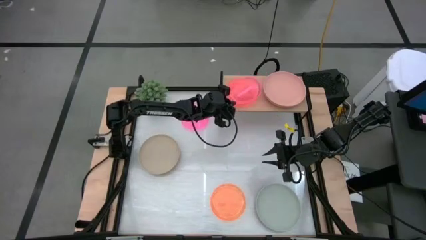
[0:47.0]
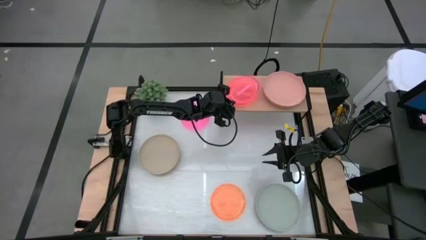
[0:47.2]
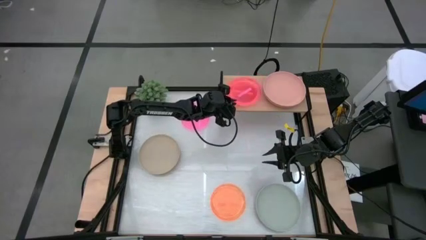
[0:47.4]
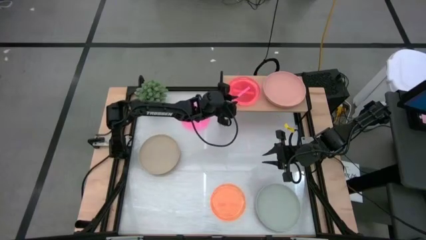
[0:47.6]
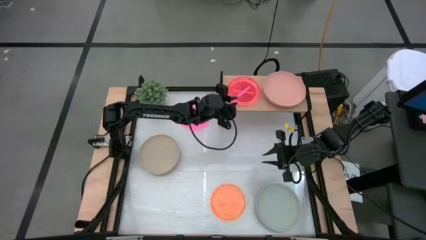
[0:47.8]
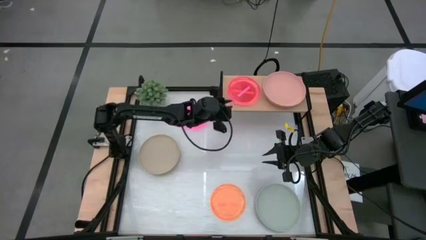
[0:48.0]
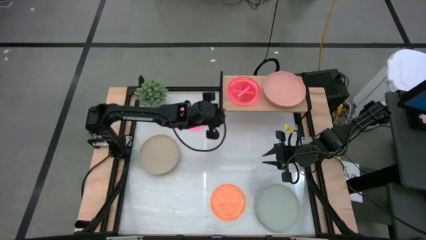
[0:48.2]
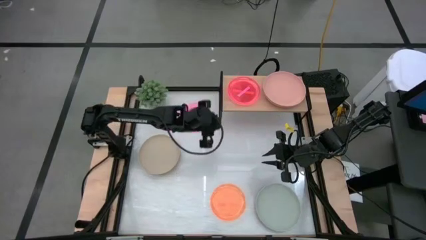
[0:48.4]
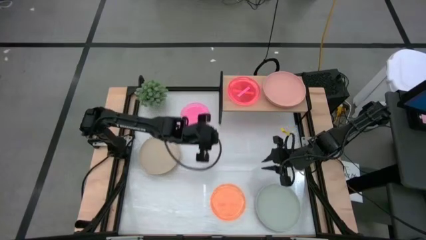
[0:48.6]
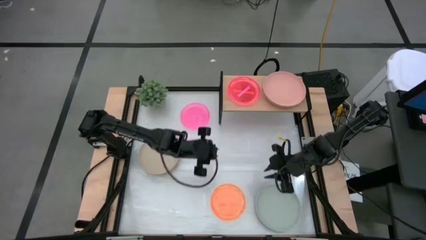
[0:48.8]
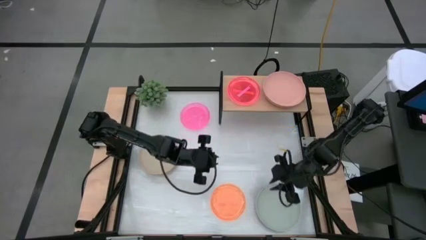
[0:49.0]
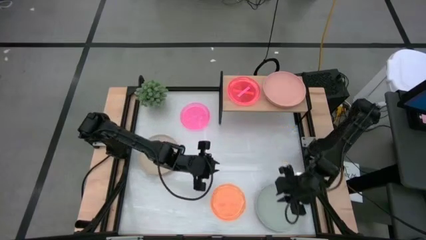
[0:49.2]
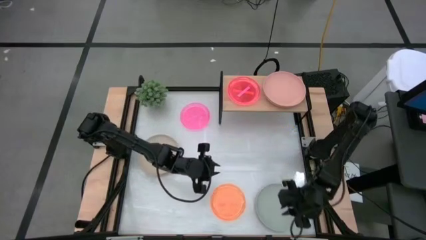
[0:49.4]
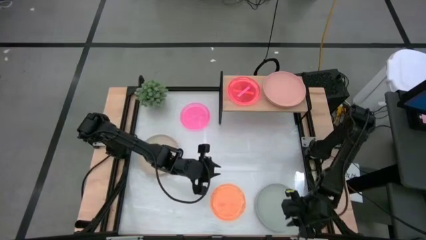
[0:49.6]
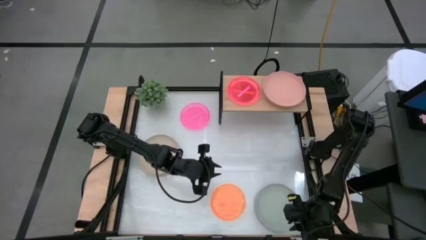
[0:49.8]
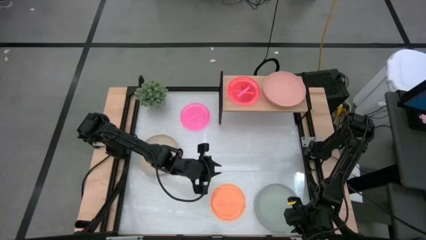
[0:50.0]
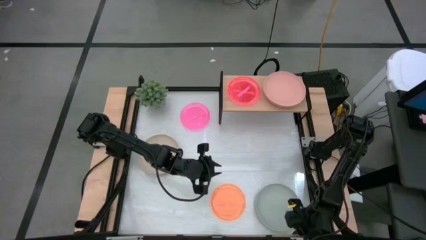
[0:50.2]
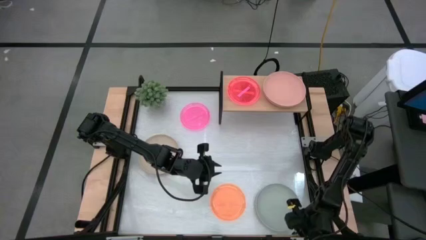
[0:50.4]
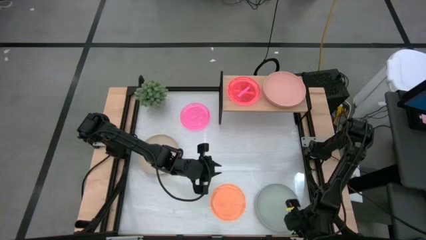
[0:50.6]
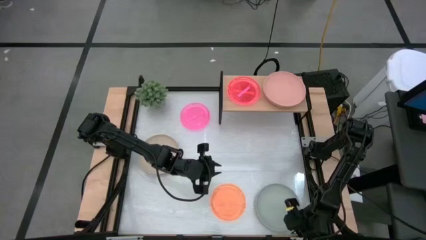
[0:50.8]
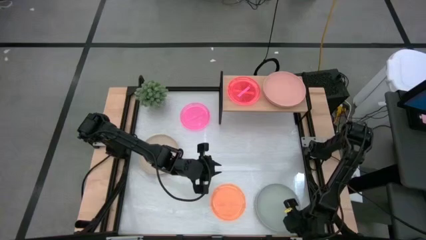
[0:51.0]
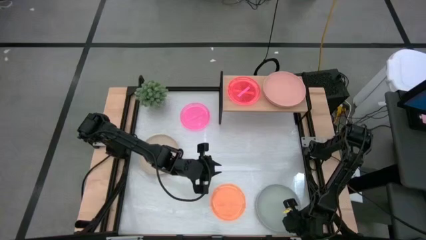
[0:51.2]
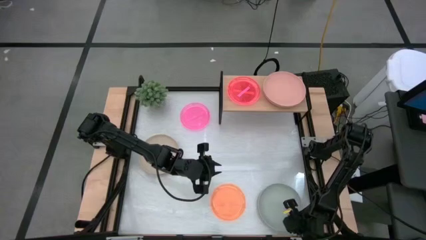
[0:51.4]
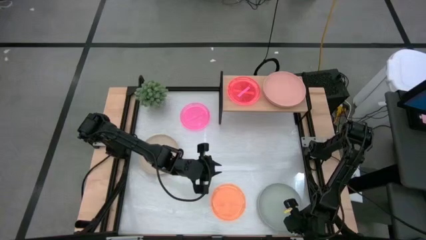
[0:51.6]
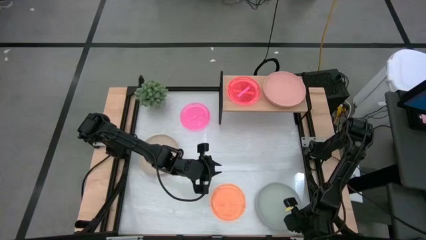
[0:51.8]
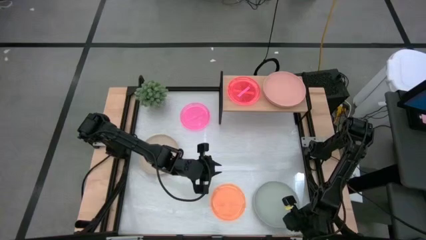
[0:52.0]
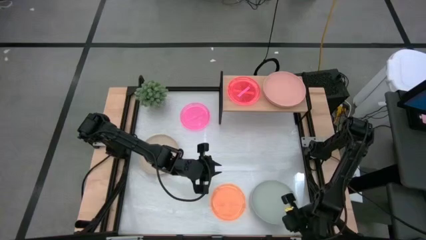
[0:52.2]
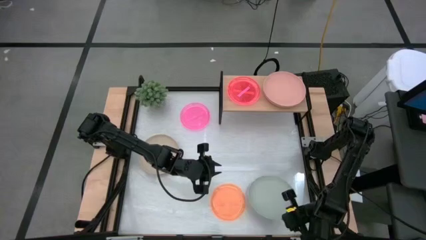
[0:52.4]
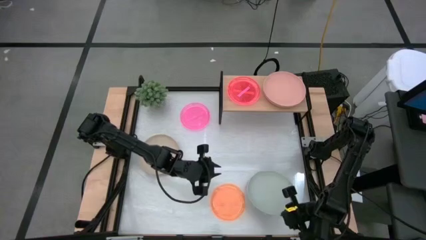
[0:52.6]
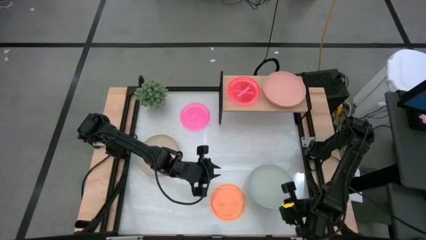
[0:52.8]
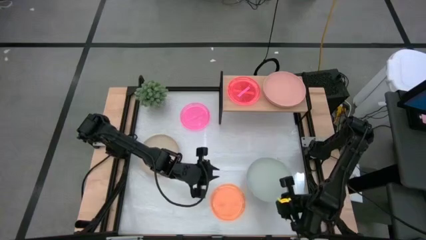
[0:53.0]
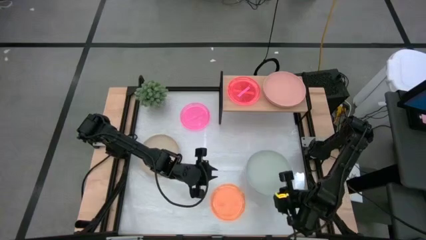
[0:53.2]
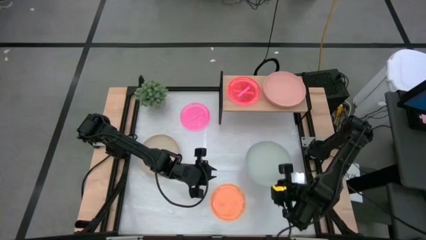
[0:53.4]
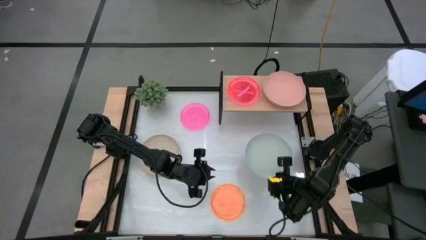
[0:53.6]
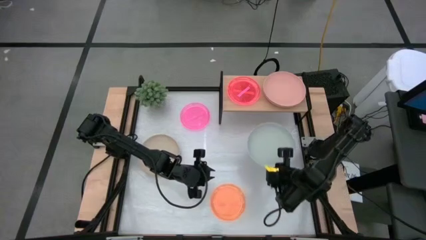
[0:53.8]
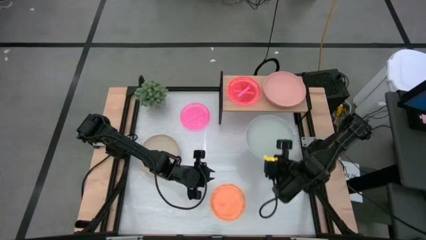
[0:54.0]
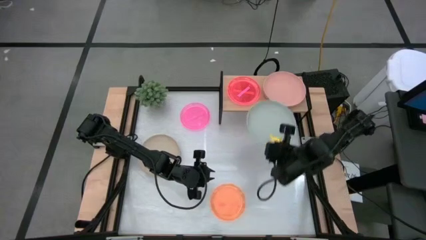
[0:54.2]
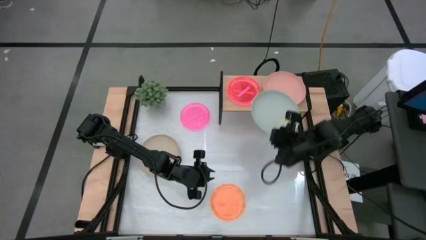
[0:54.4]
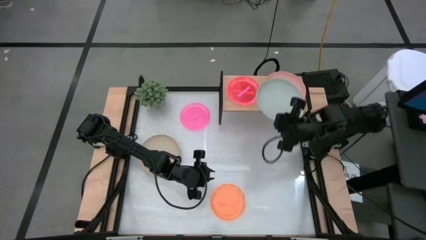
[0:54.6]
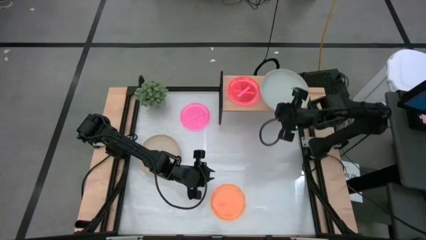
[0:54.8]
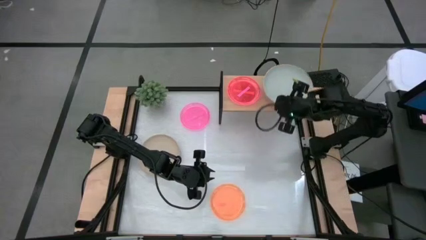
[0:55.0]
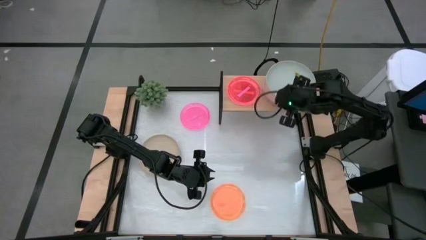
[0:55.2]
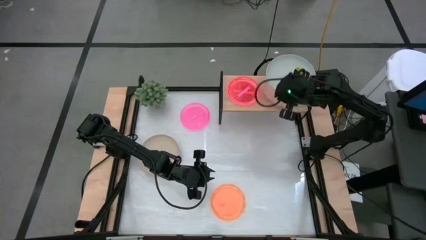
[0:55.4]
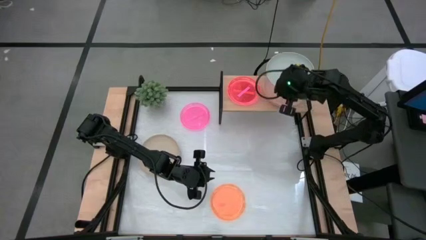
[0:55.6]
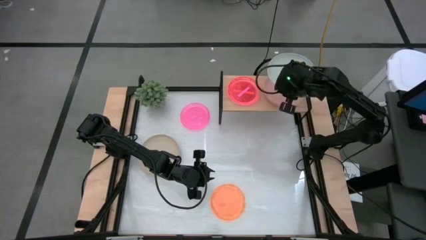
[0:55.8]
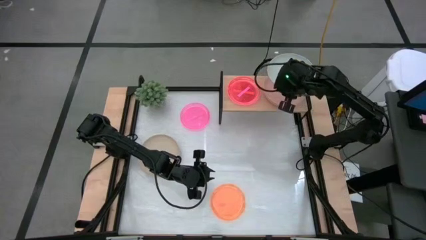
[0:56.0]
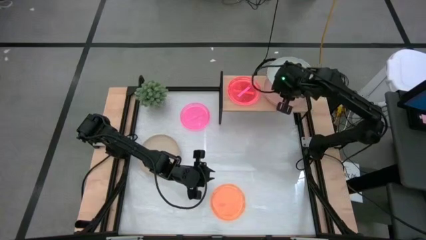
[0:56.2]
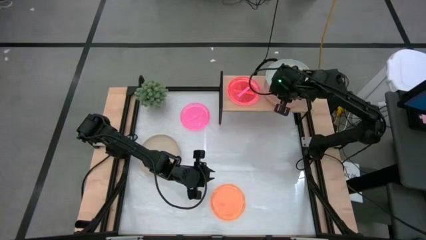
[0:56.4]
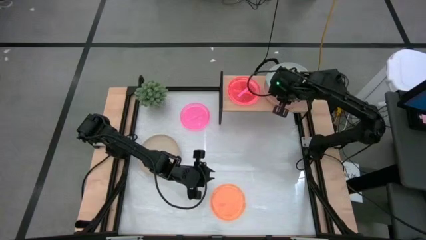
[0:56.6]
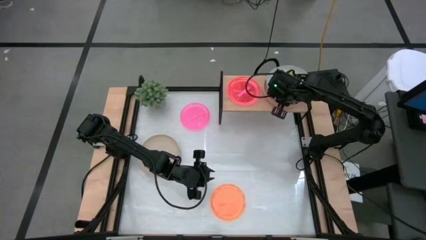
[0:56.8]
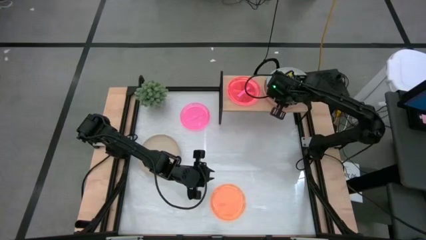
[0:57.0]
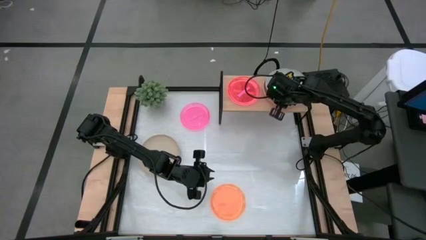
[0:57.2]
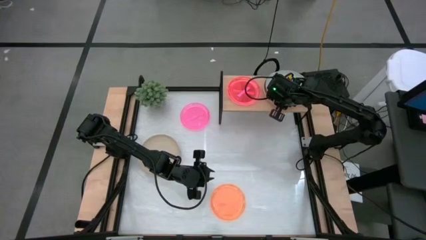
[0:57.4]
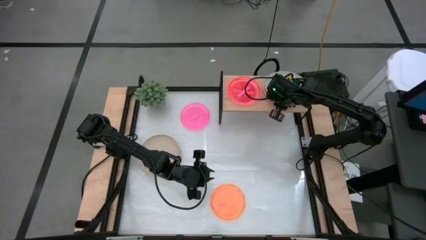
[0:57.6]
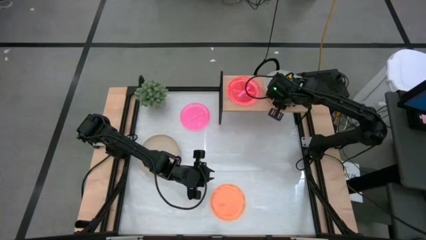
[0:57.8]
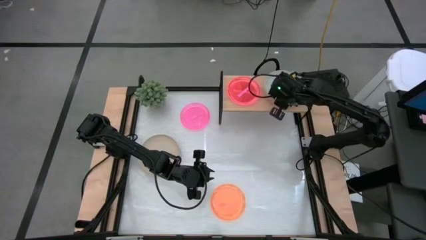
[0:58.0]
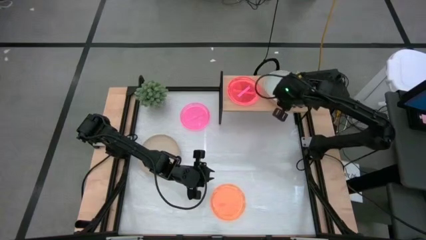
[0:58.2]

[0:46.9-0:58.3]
Task: Place and stack plates onto a shelf
Stack the gray plate on top of the light pink plate on the shelf
